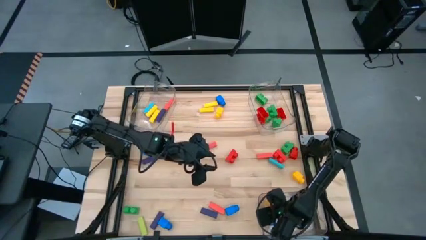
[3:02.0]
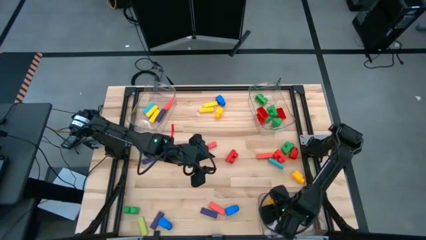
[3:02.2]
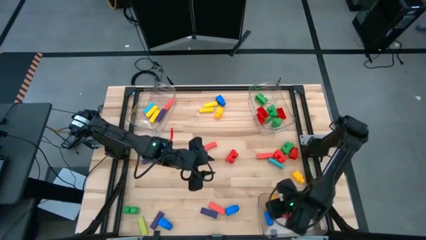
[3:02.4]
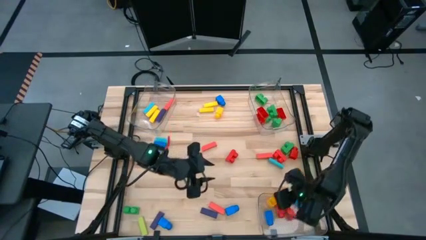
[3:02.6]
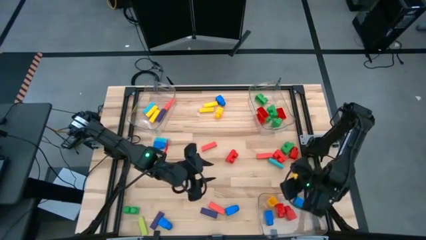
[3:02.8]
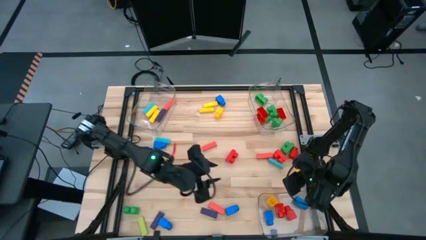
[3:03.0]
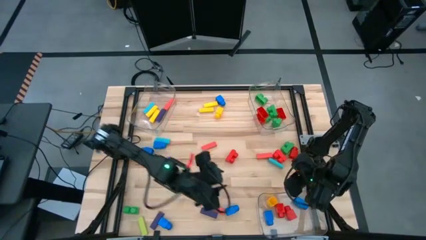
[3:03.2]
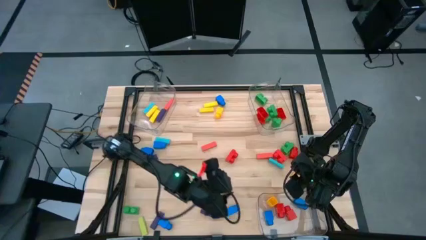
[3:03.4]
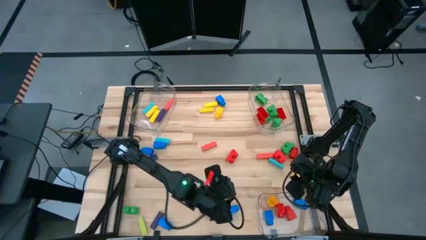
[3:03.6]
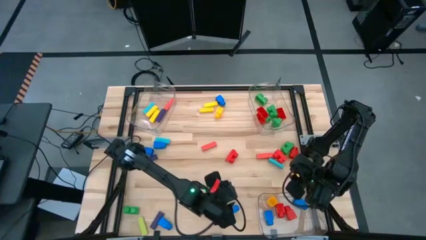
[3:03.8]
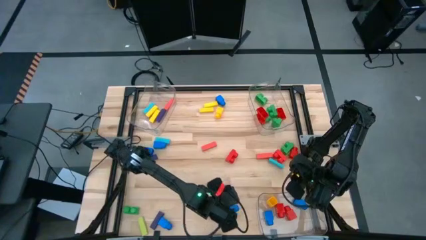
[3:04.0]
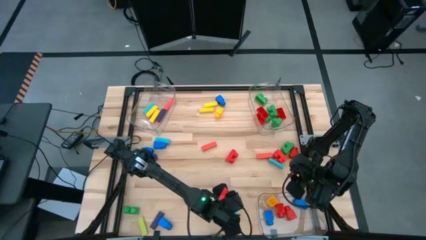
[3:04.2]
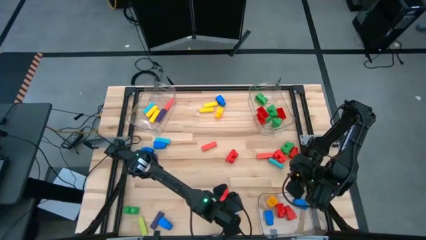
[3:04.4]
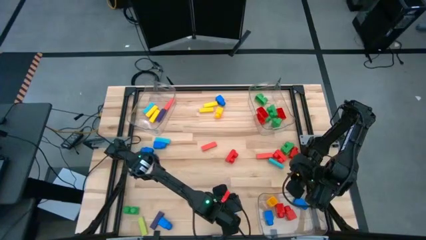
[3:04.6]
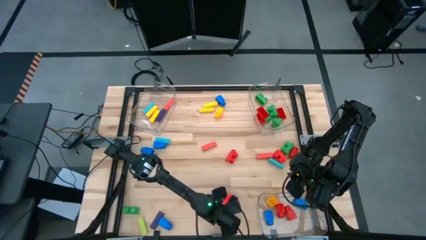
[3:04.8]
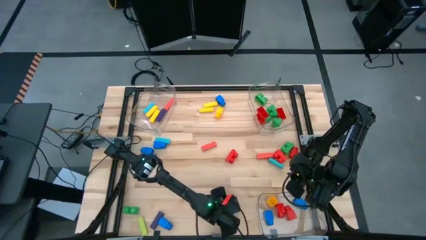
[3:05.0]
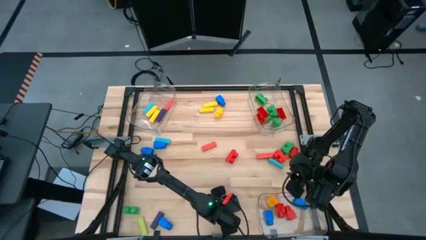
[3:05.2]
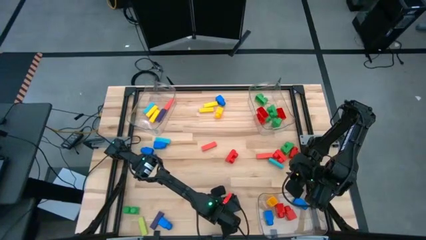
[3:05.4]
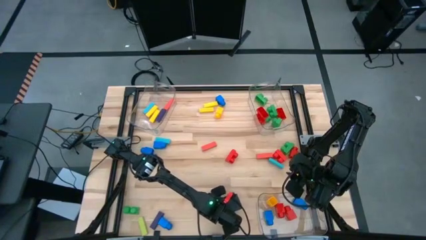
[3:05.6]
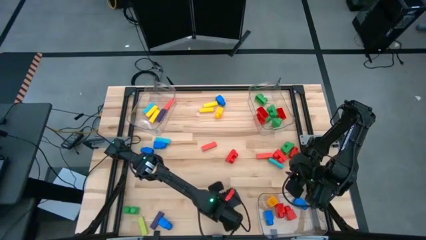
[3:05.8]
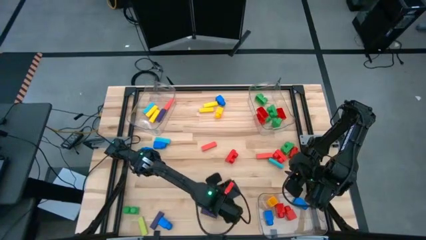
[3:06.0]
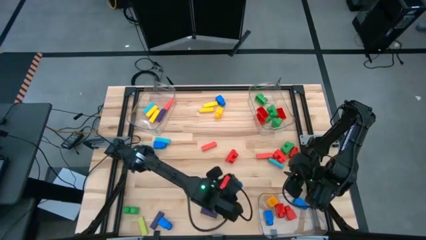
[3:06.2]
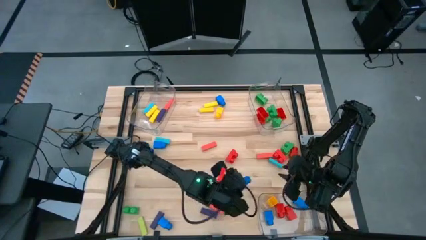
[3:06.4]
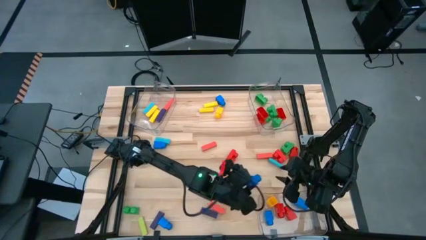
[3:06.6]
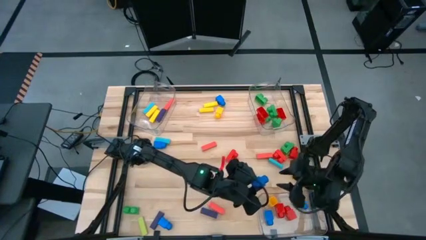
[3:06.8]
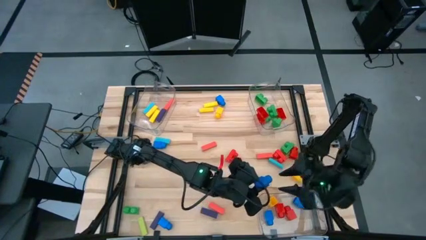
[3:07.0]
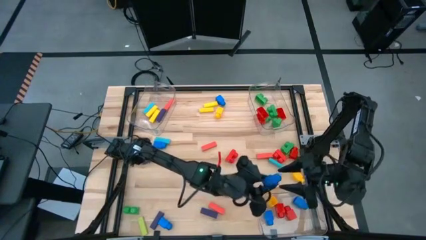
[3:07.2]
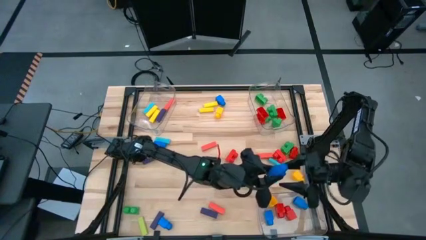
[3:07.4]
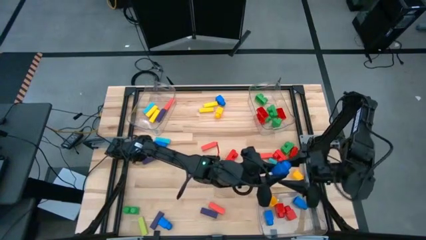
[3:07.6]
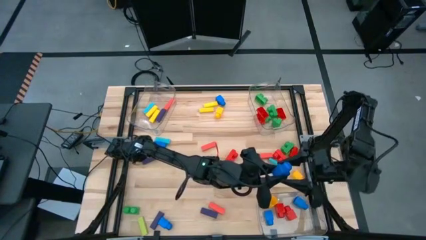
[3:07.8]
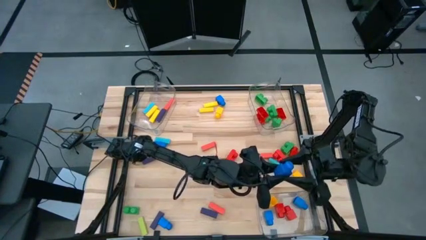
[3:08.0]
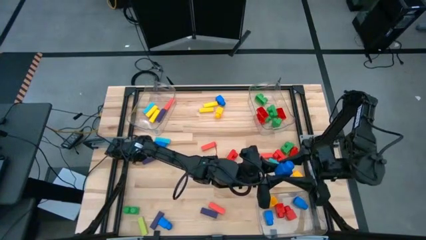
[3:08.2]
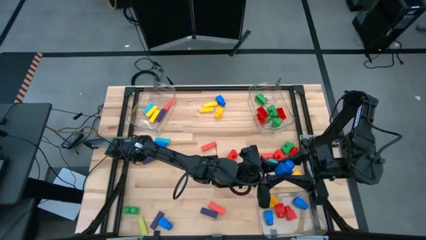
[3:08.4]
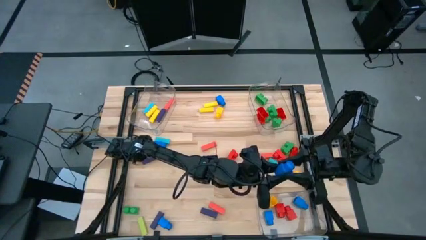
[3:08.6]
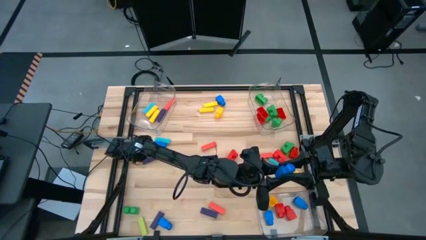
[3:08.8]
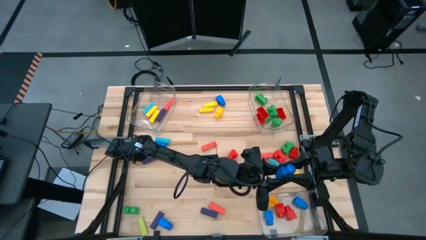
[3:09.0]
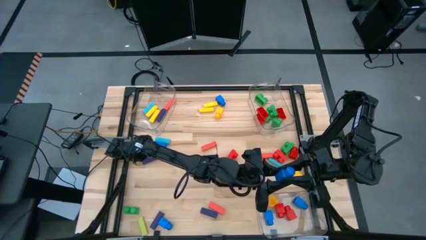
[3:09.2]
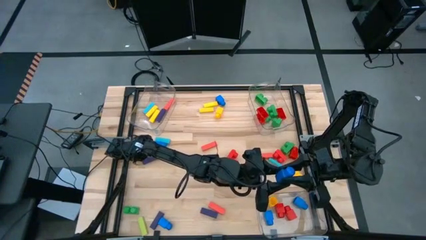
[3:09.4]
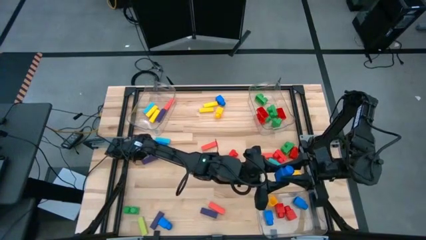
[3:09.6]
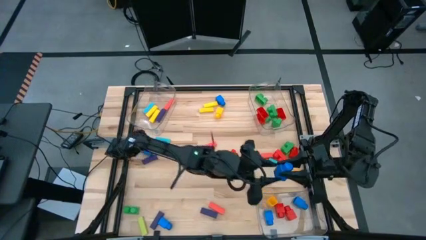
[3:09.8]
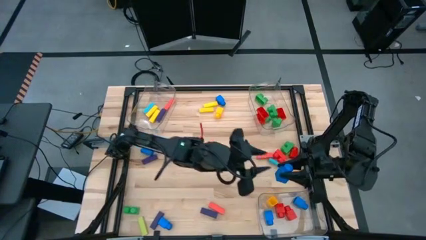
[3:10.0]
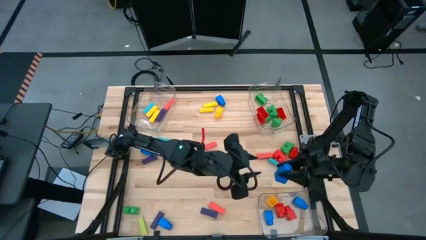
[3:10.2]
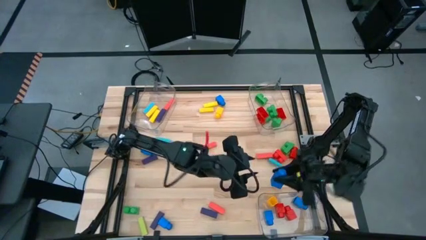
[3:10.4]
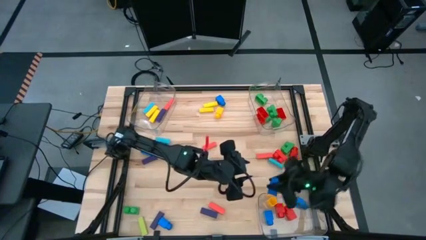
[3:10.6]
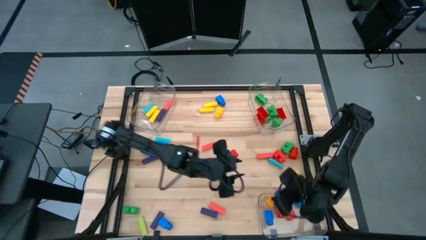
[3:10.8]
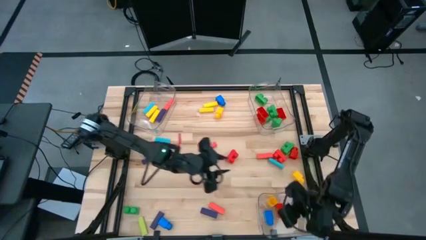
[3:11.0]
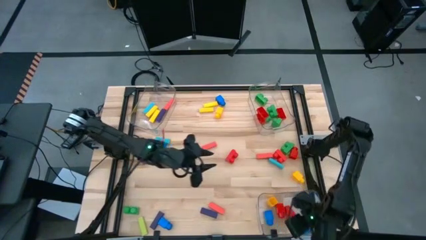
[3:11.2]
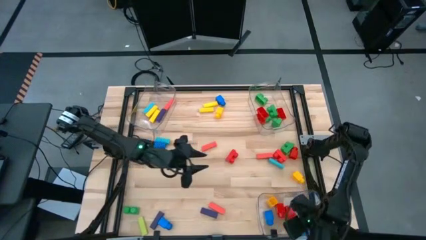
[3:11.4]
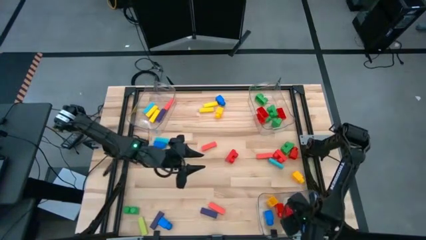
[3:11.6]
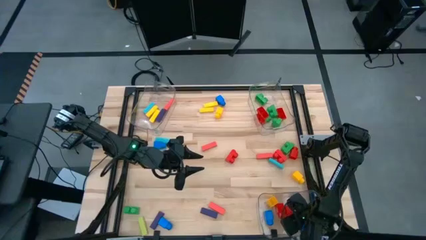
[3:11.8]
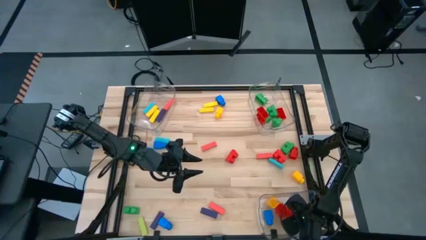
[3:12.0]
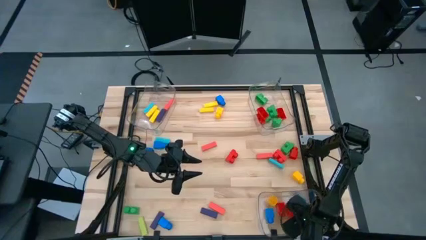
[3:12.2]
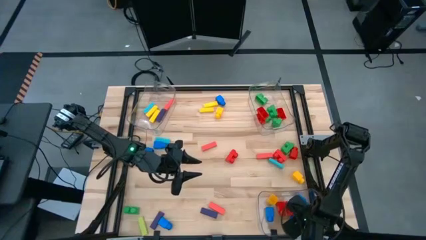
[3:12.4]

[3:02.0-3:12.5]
Task: Sort blocks by size
Put the blue 1 stud game piece into the bottom transparent bin

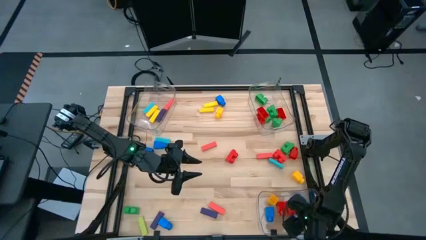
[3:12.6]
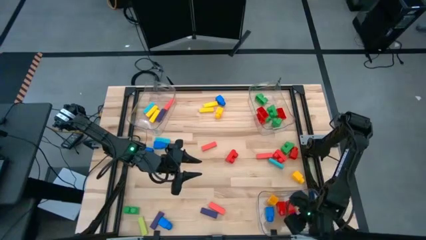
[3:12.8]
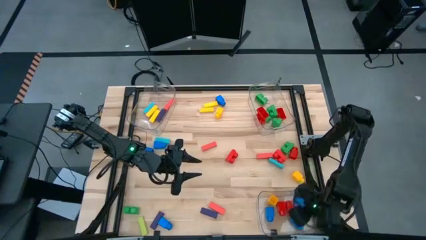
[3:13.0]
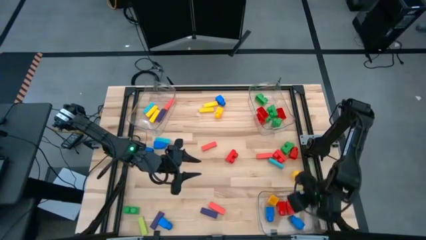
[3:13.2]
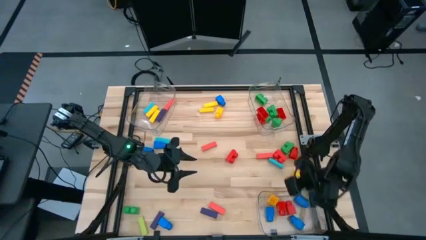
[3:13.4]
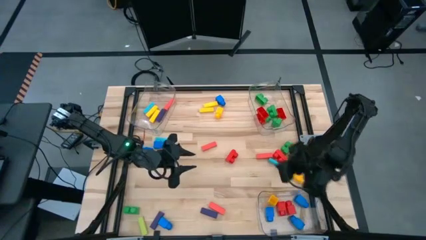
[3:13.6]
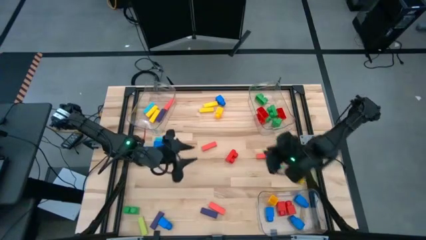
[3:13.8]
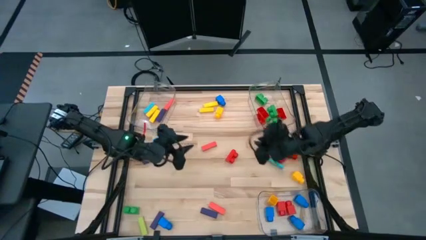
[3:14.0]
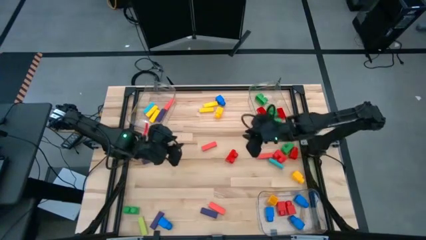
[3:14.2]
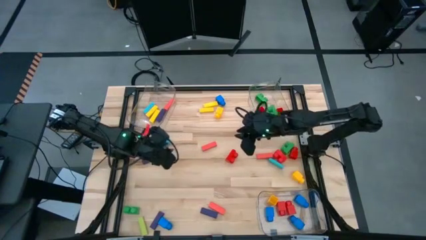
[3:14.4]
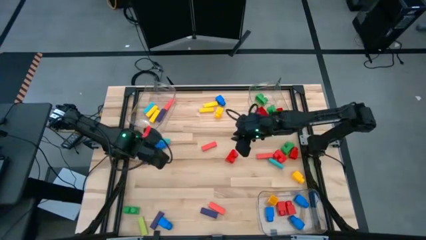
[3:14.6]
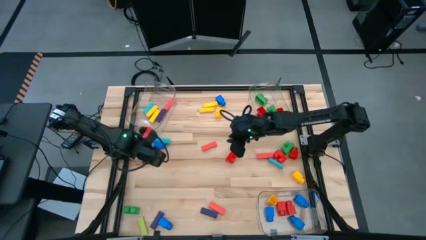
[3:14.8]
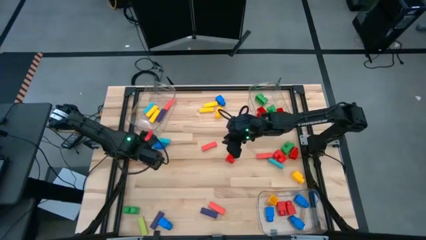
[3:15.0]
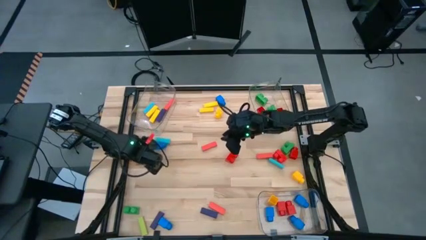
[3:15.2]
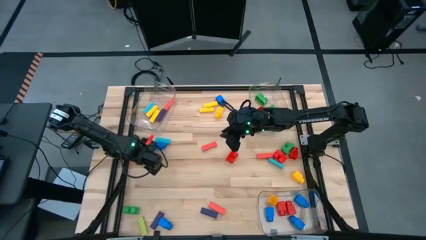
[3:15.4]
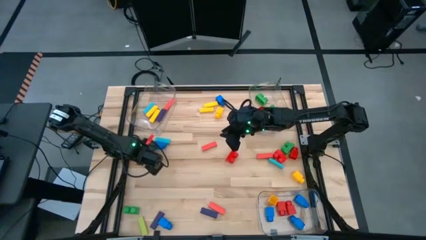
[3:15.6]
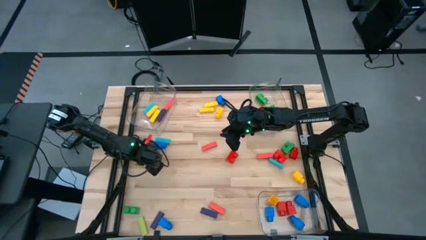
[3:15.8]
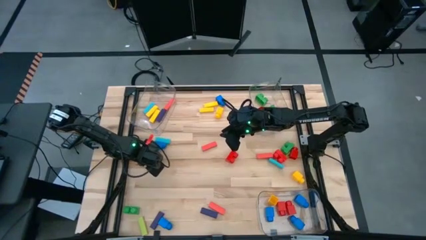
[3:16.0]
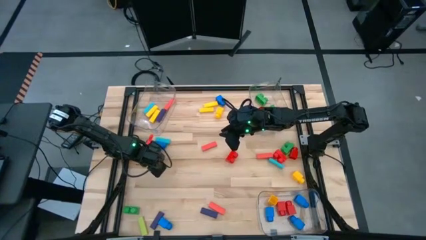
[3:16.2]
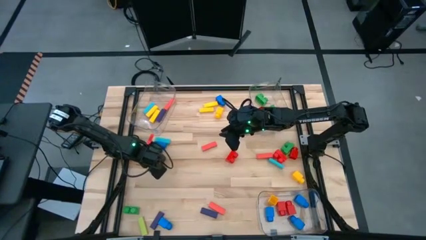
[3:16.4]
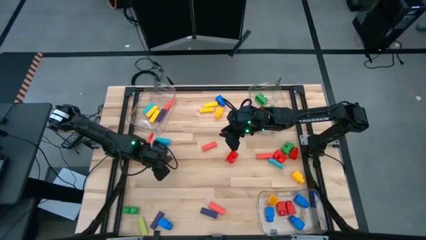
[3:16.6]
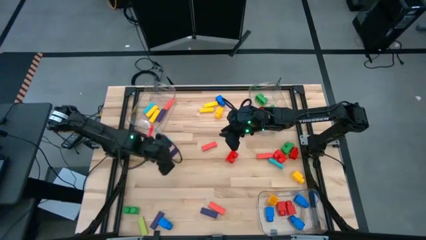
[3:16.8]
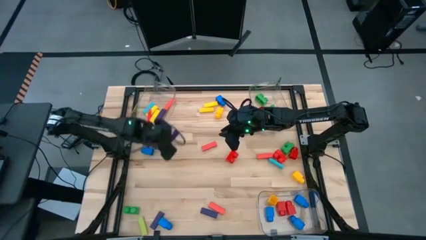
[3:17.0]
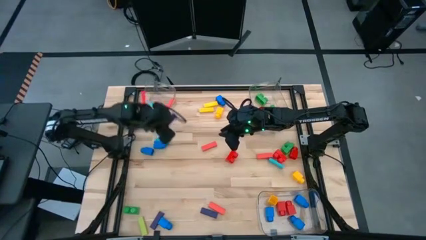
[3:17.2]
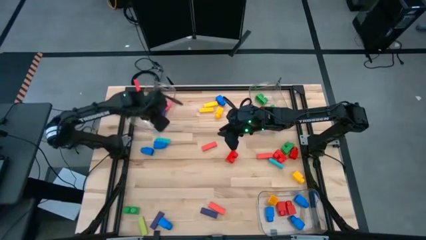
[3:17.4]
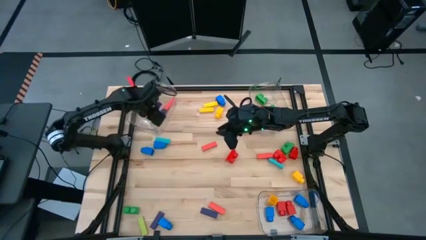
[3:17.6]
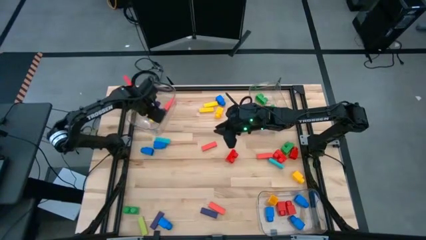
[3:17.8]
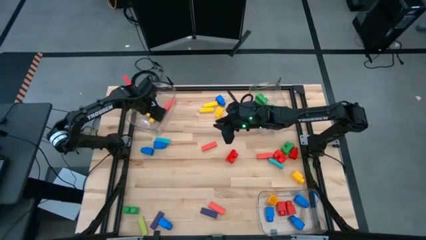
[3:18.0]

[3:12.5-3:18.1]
Put the purple block into the top left transparent bin
